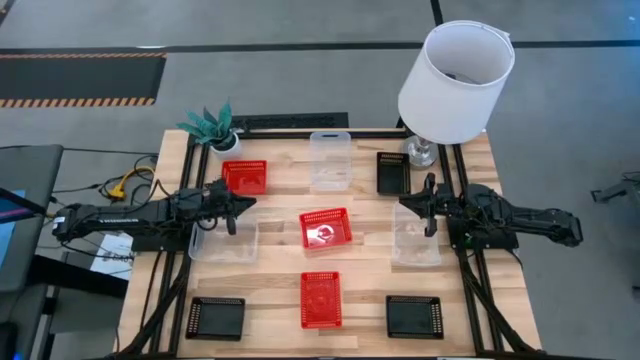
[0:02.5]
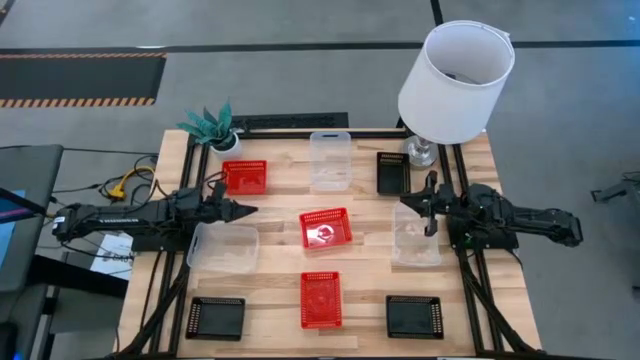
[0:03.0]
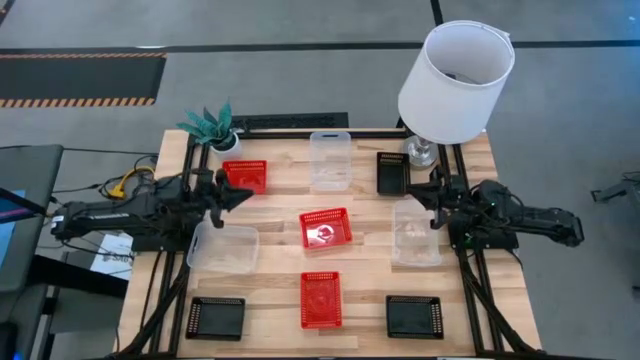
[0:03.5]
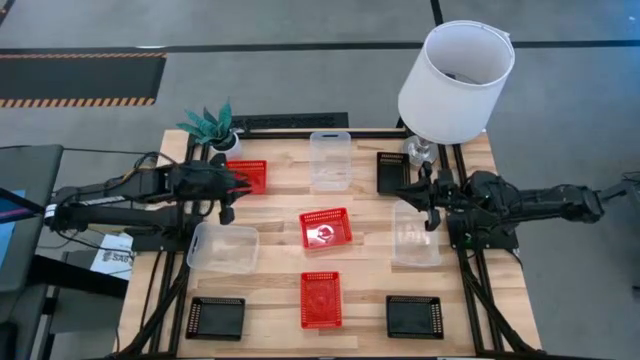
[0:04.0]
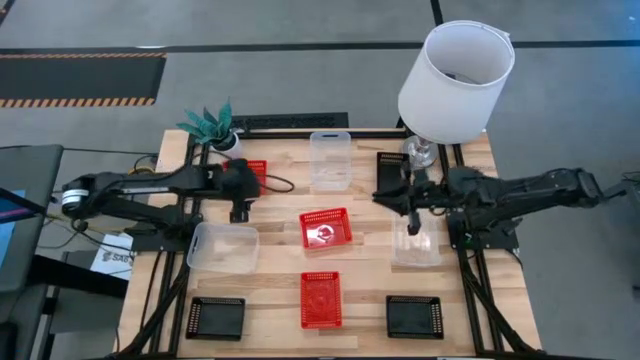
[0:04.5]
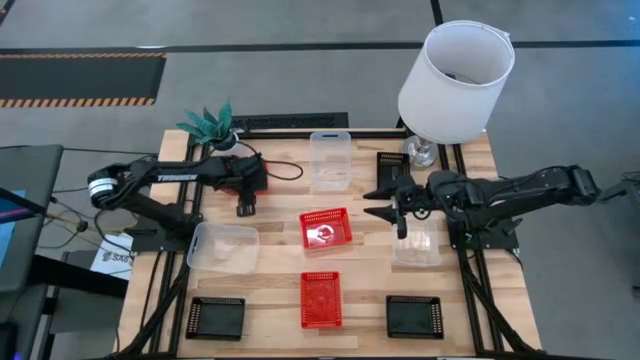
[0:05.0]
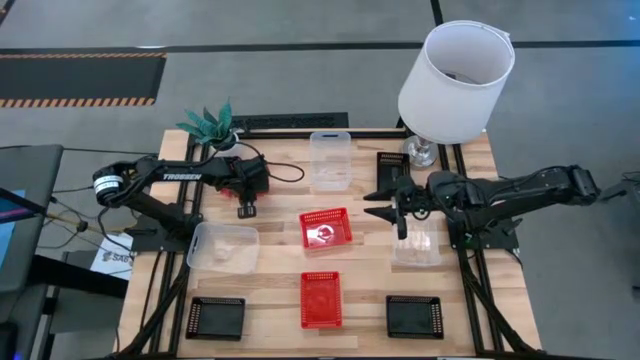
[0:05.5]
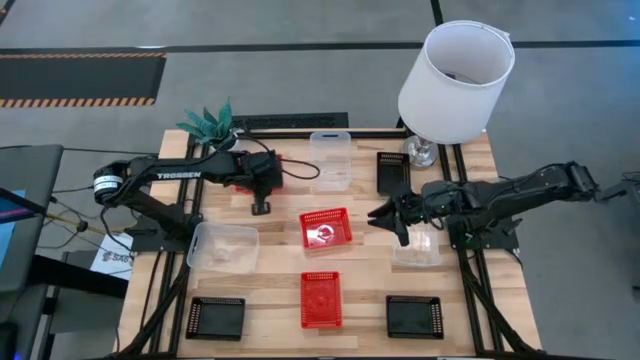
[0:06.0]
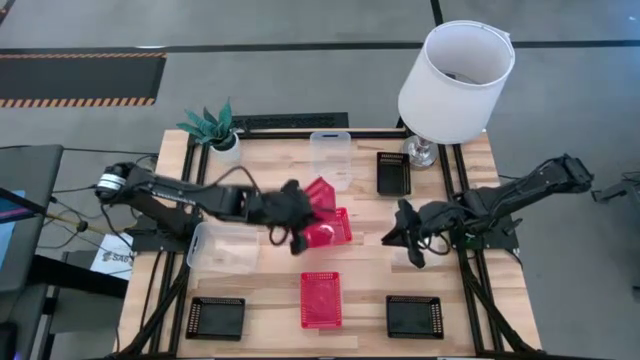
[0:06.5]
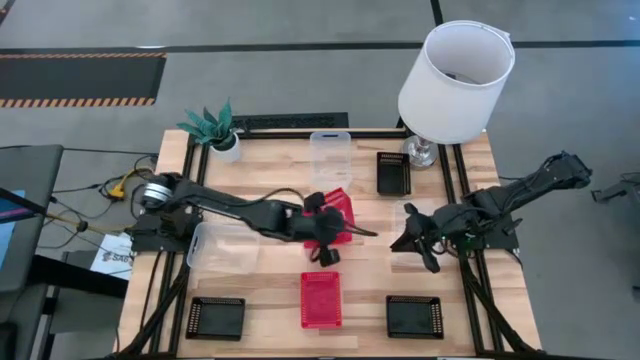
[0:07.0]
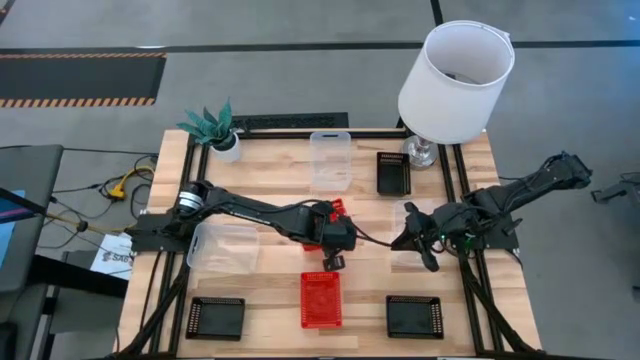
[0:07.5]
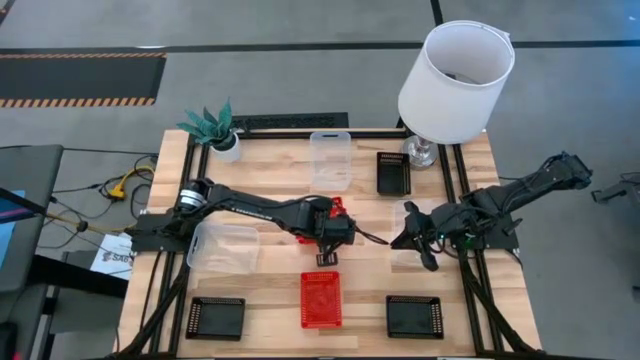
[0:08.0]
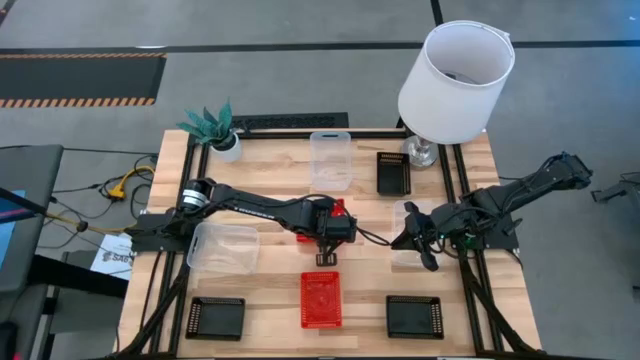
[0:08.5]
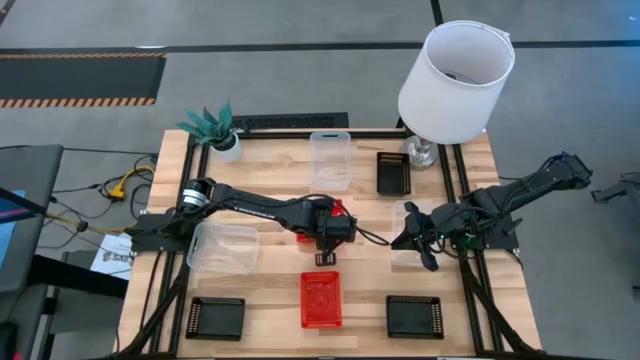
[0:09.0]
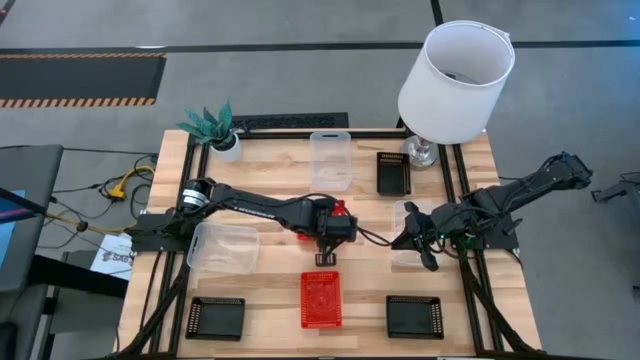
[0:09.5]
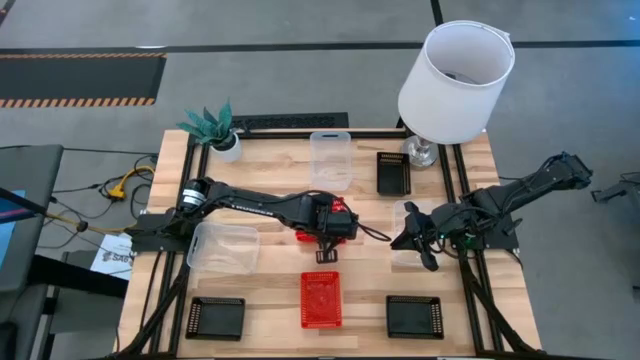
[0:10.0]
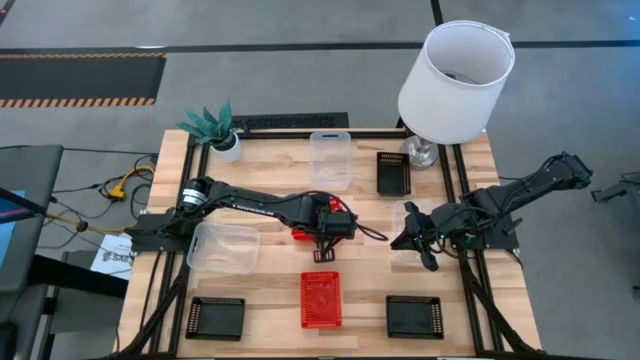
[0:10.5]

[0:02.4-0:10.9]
Stack the top red bin on the middle red bin

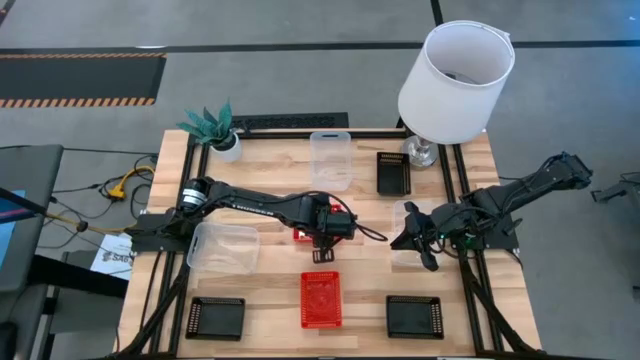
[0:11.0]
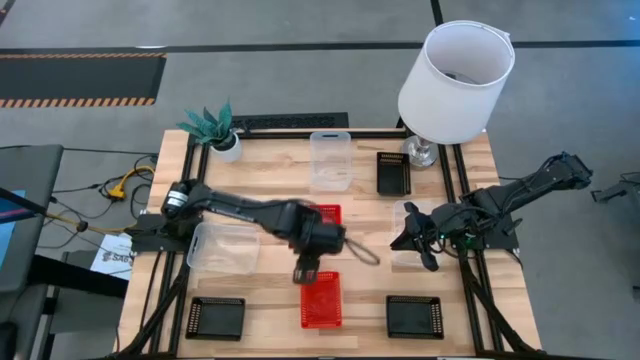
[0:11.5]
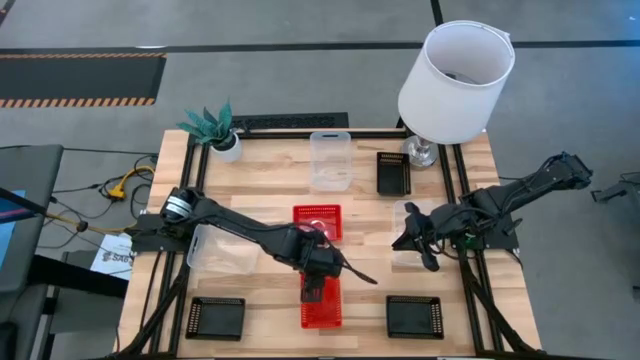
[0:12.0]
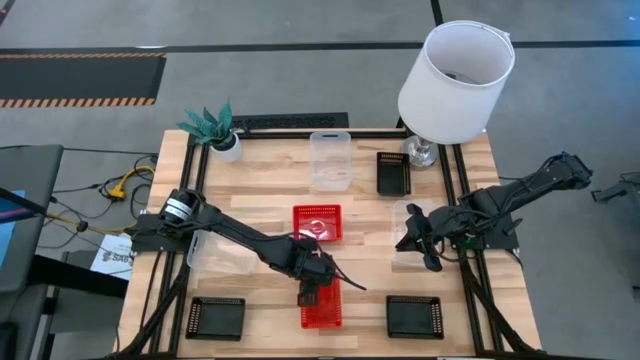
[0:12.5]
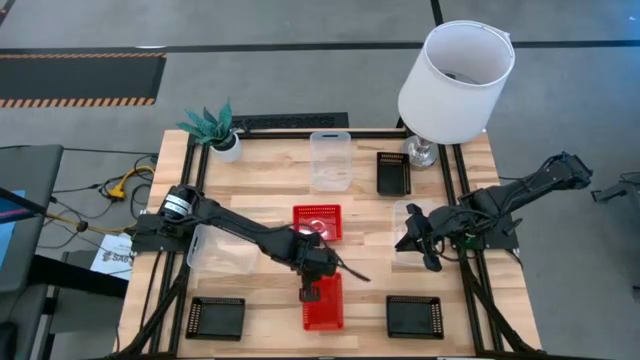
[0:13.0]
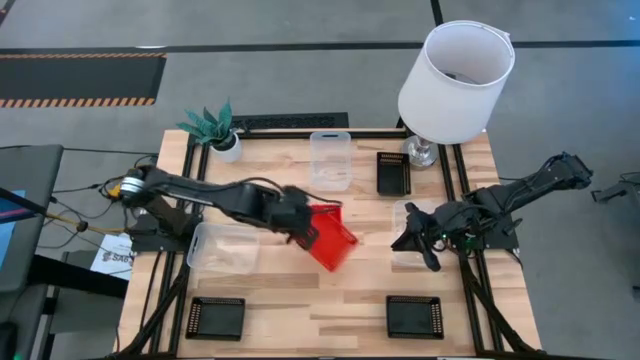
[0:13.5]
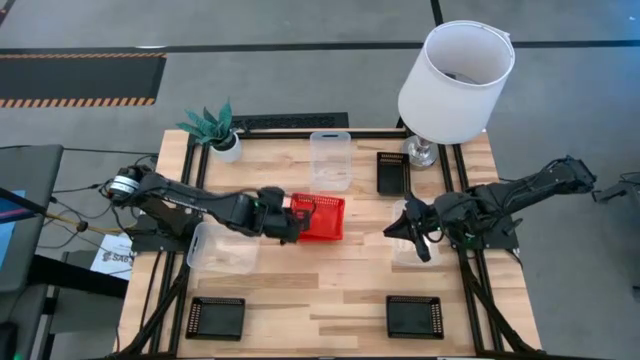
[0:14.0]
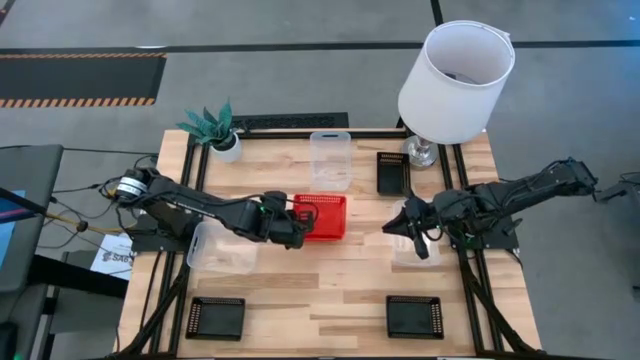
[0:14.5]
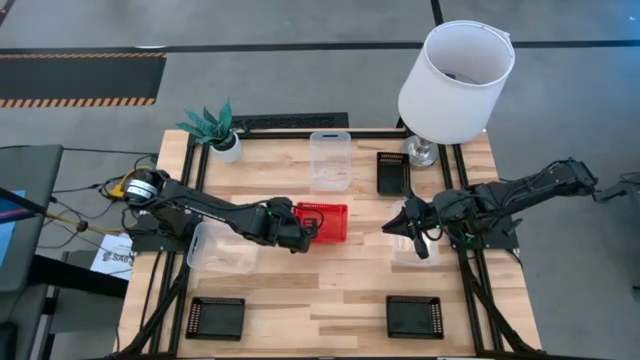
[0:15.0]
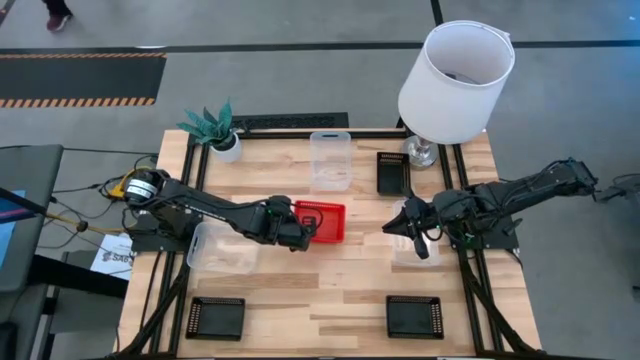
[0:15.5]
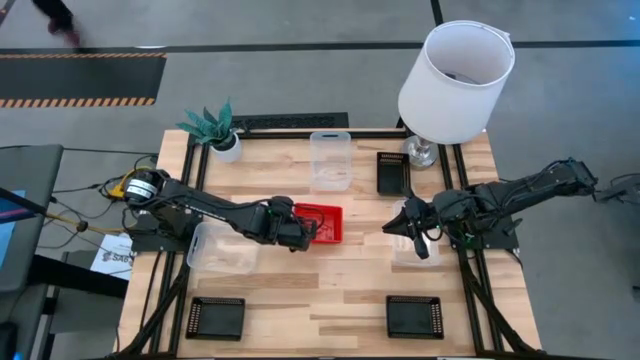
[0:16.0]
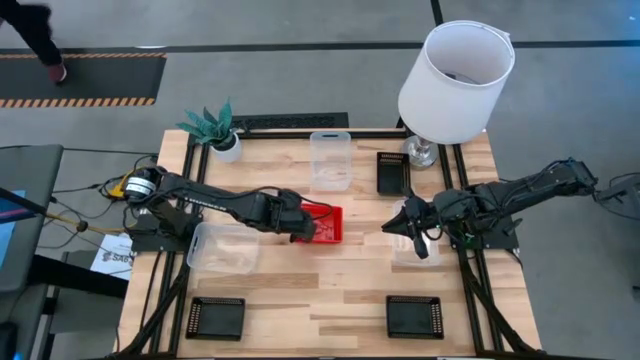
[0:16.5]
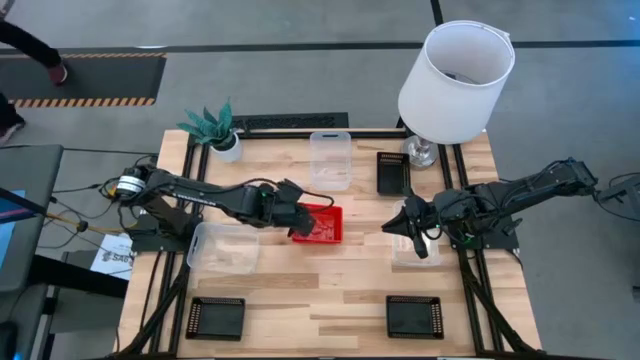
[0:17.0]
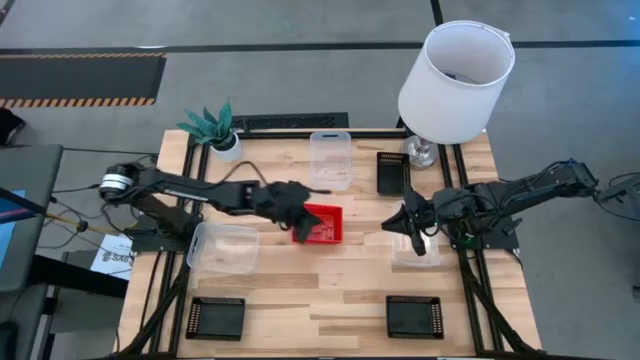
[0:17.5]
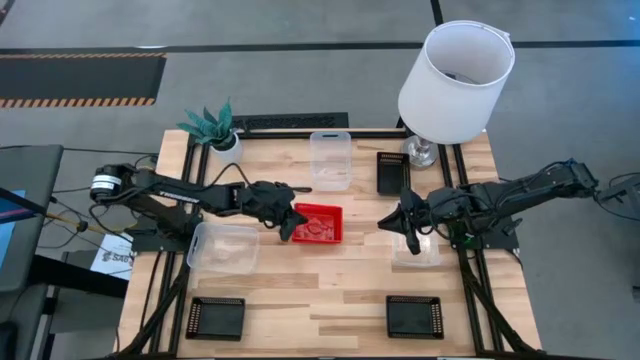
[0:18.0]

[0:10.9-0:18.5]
Stack the bottom red bin on the top stacked red bins

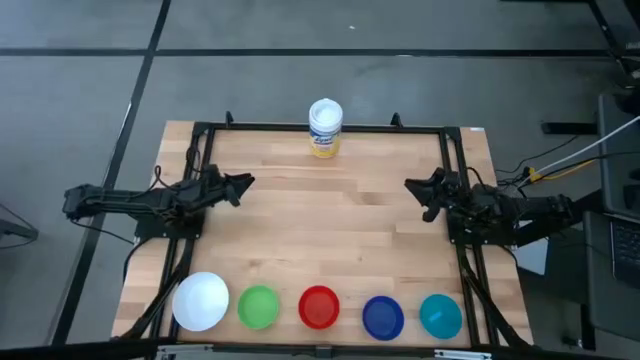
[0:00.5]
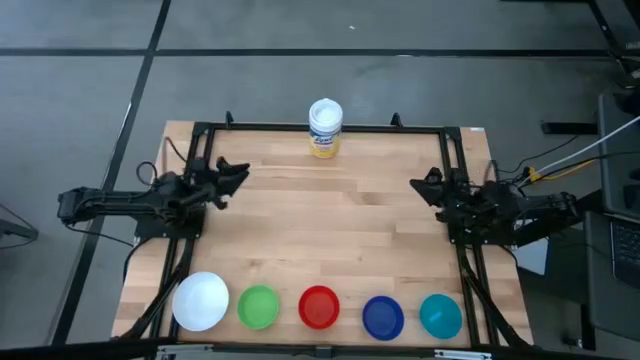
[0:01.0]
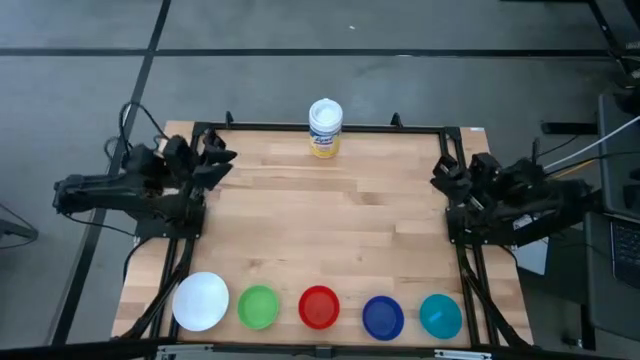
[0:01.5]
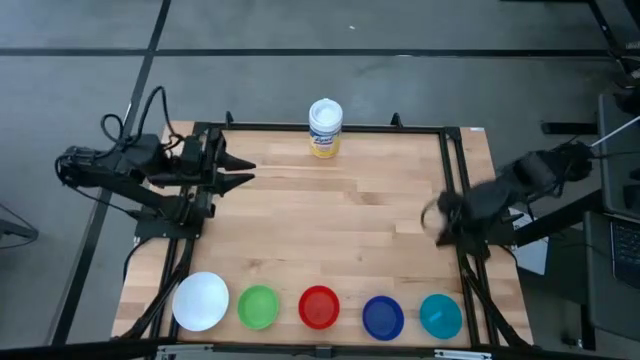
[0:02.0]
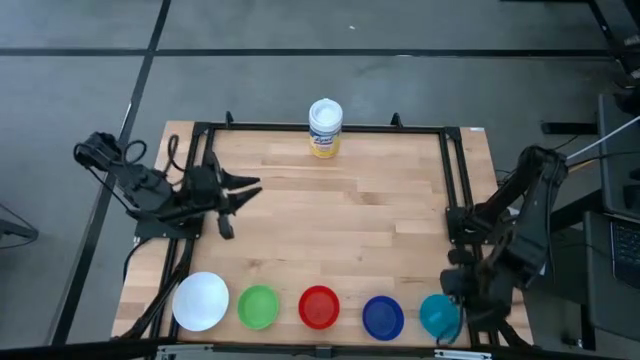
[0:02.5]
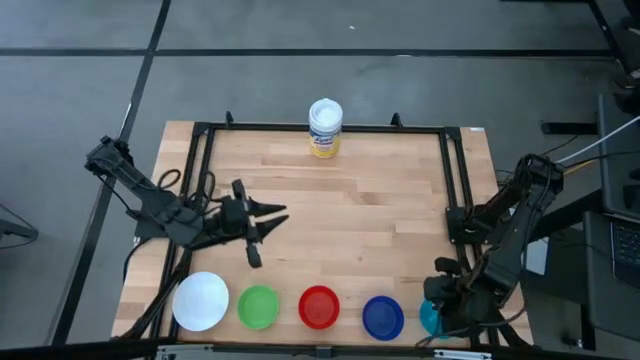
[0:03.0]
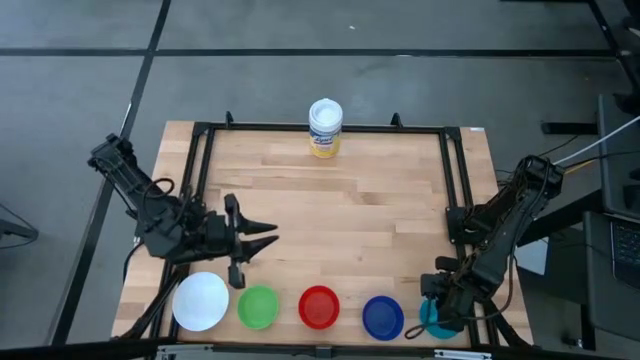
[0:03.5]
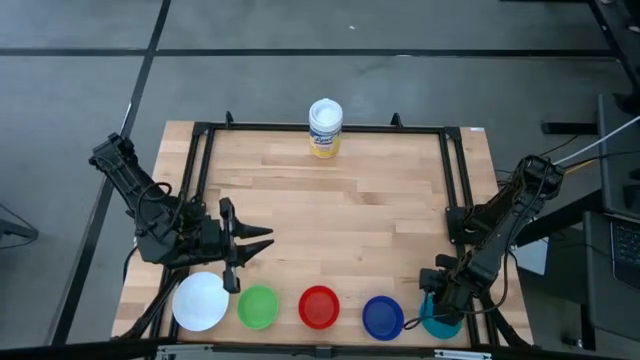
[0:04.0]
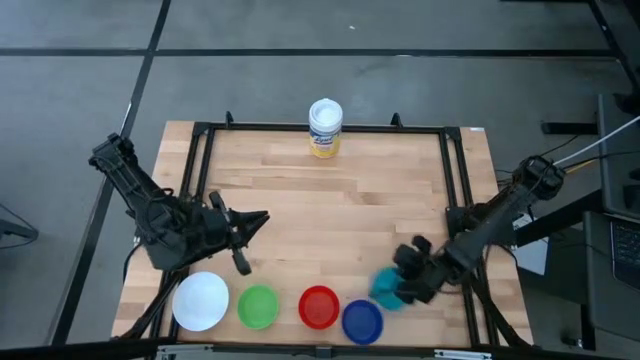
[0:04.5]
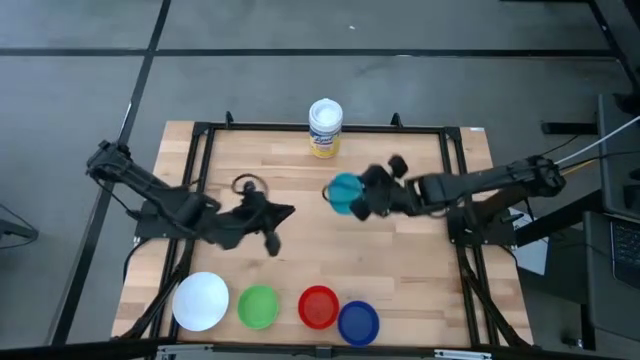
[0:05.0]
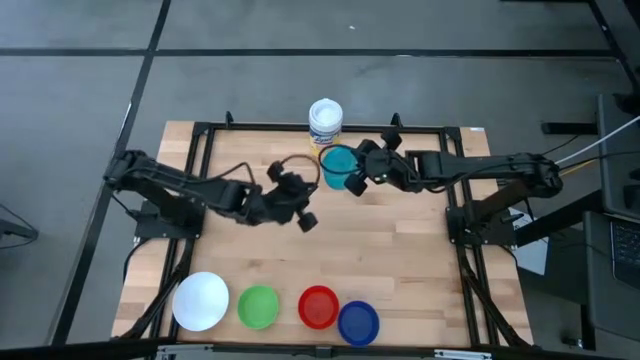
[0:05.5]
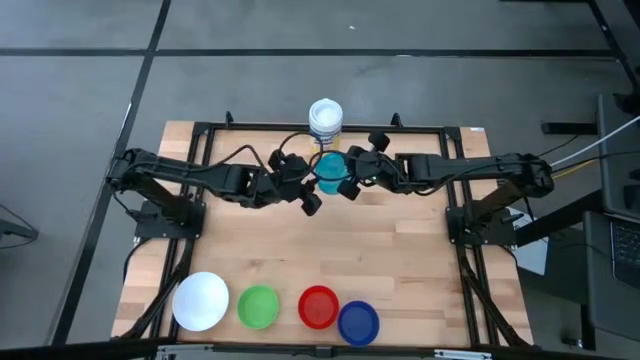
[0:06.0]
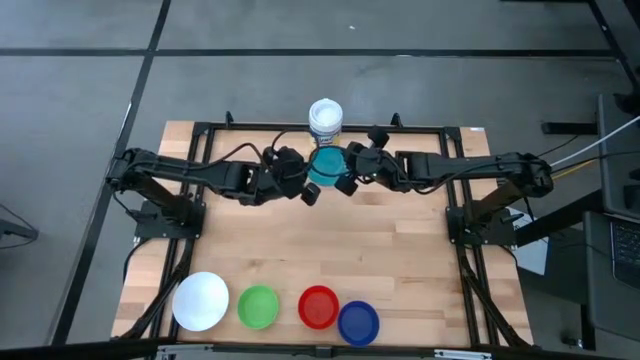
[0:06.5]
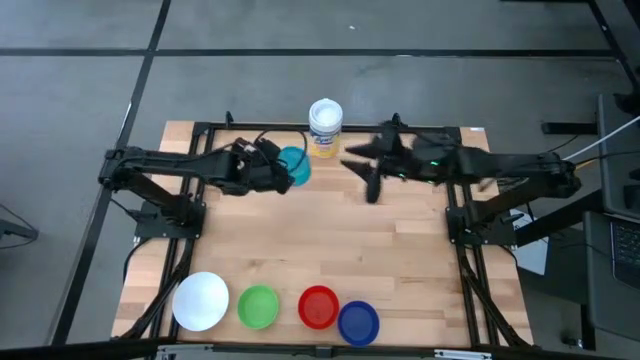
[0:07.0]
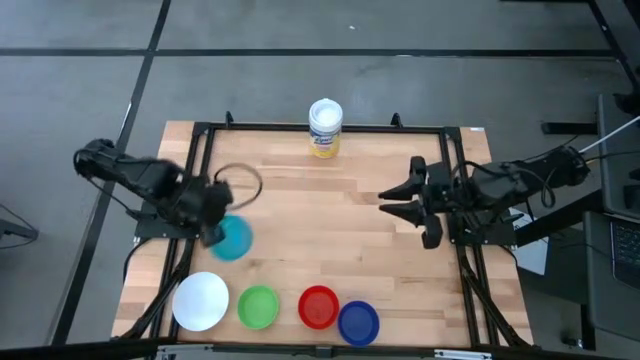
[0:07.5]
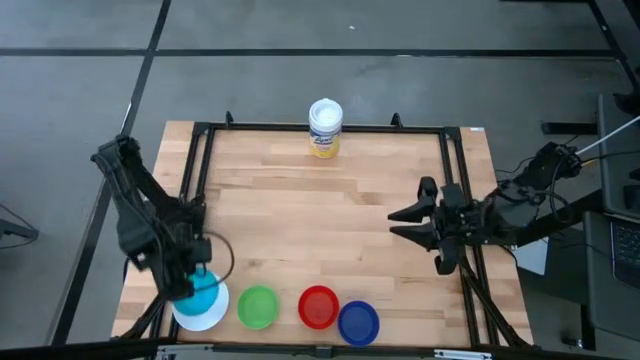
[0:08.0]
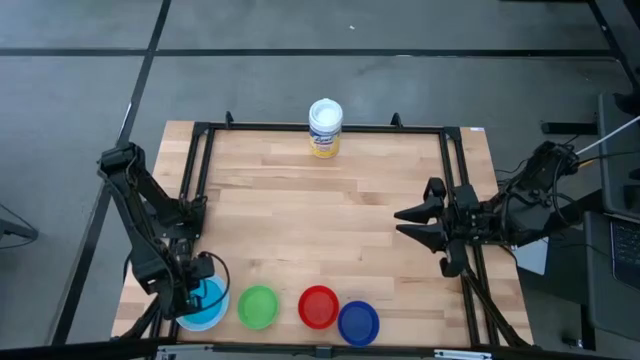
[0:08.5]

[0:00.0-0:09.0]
Stack the light blue bowl on top of the white bowl
